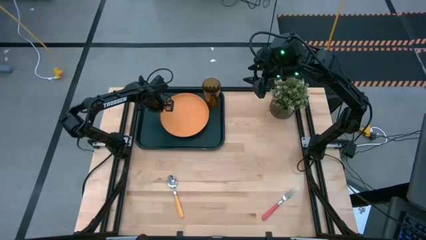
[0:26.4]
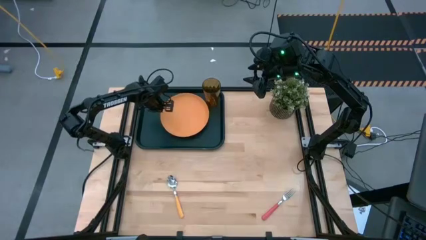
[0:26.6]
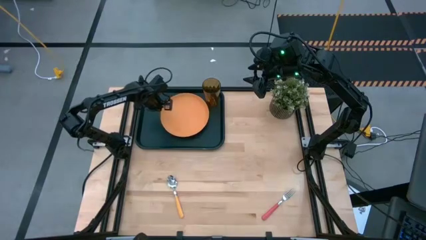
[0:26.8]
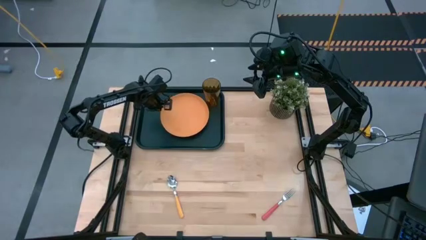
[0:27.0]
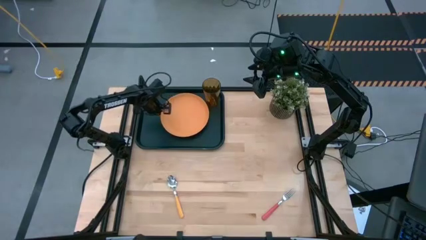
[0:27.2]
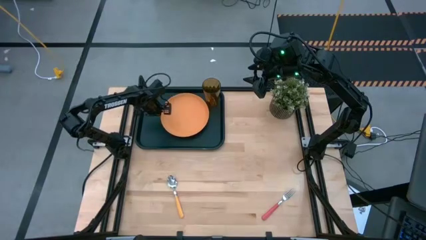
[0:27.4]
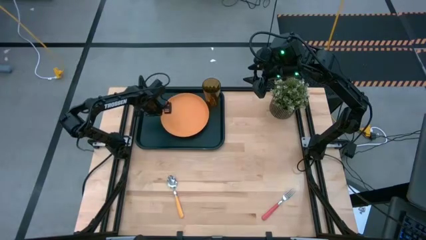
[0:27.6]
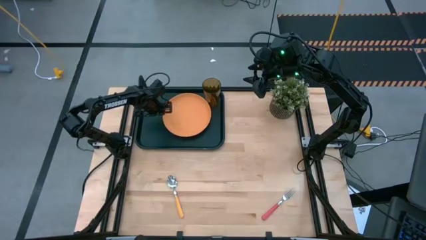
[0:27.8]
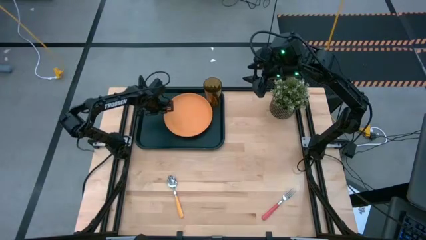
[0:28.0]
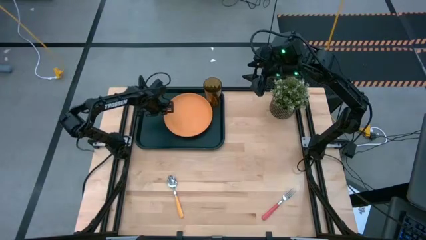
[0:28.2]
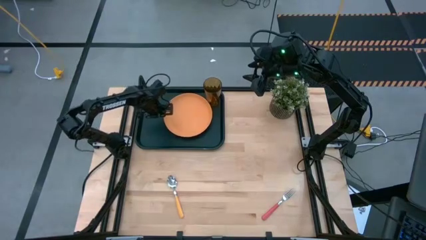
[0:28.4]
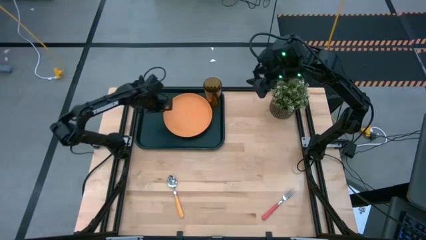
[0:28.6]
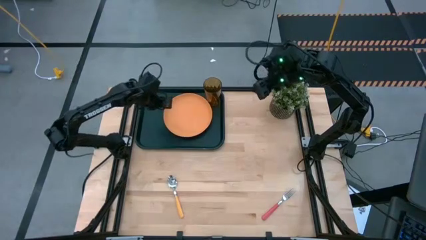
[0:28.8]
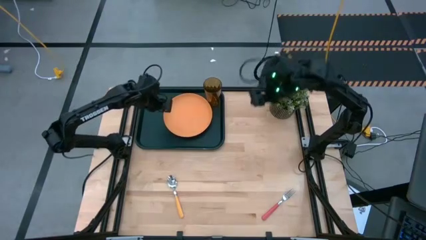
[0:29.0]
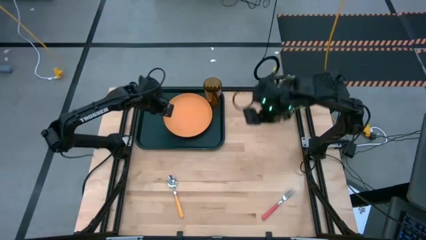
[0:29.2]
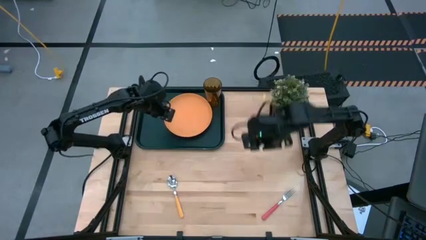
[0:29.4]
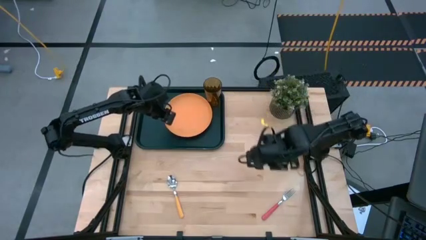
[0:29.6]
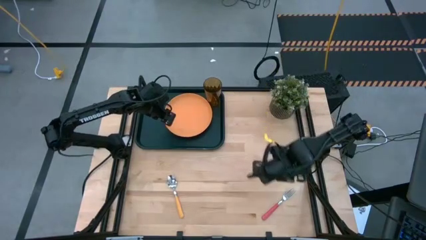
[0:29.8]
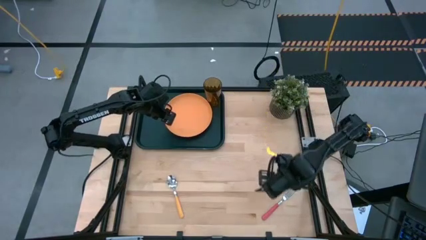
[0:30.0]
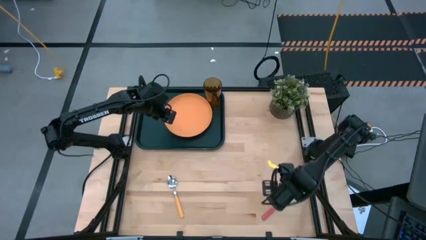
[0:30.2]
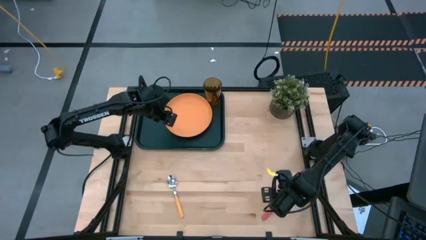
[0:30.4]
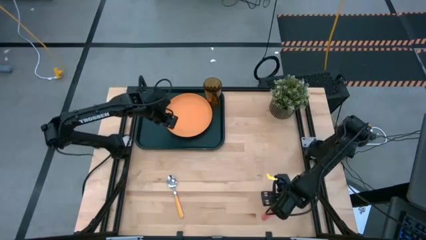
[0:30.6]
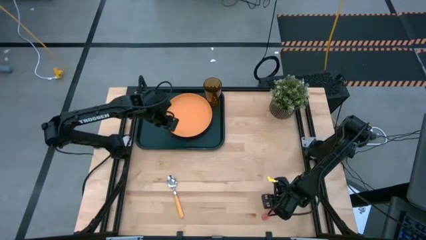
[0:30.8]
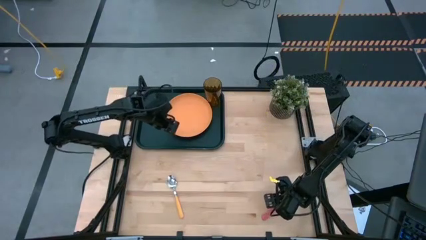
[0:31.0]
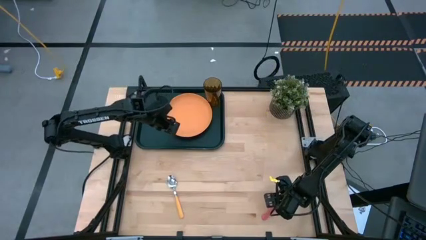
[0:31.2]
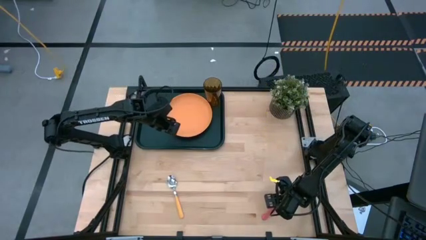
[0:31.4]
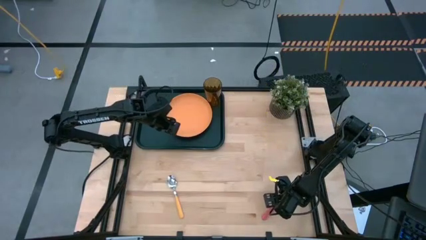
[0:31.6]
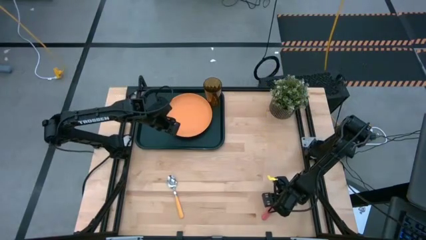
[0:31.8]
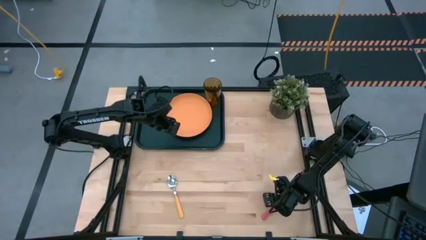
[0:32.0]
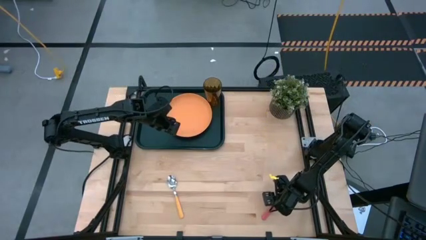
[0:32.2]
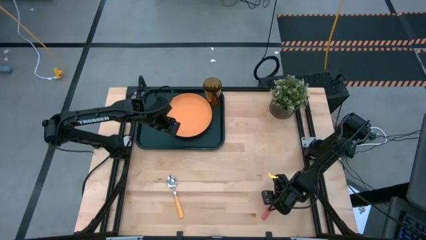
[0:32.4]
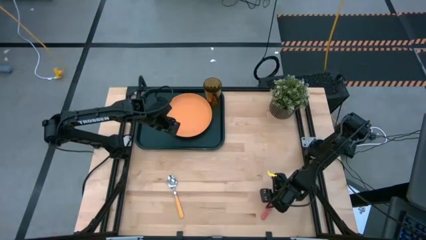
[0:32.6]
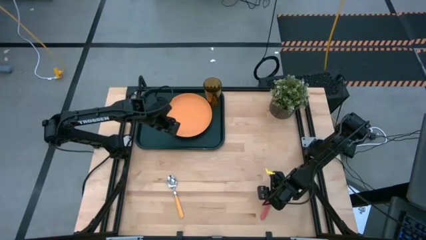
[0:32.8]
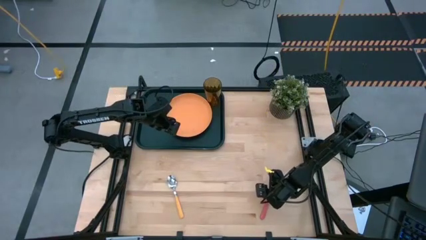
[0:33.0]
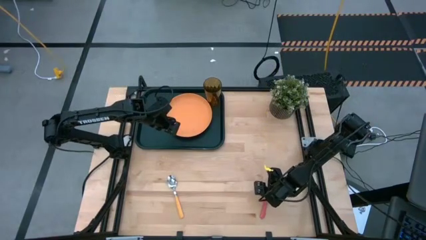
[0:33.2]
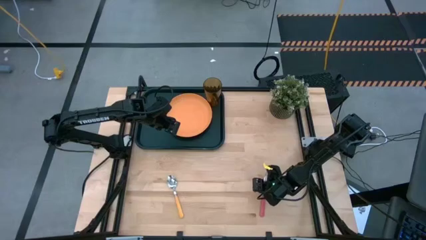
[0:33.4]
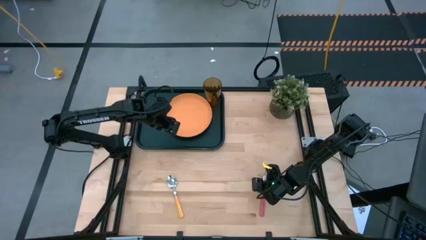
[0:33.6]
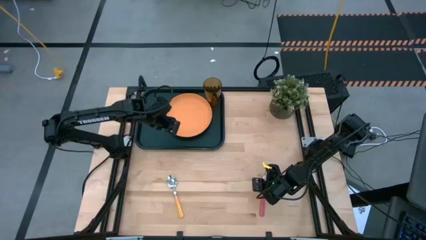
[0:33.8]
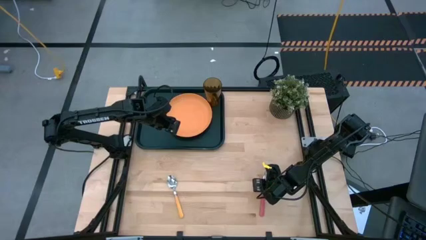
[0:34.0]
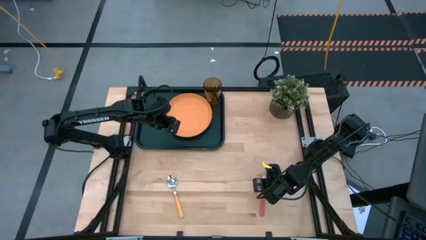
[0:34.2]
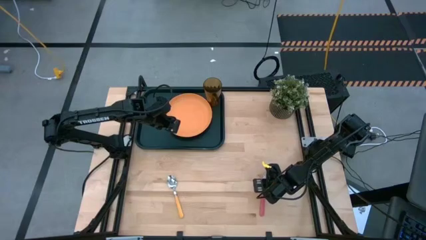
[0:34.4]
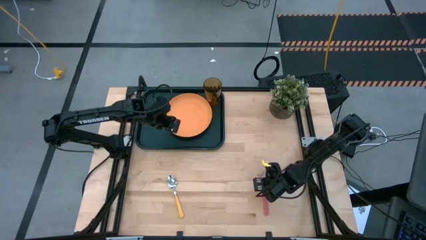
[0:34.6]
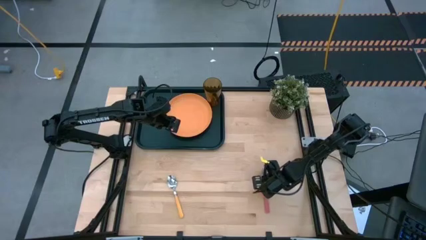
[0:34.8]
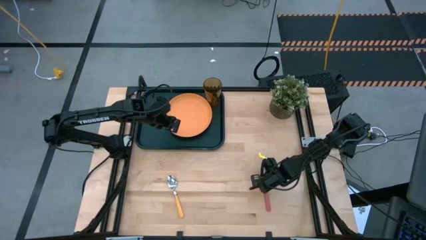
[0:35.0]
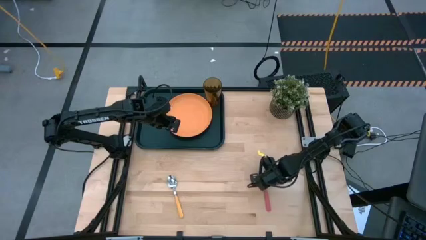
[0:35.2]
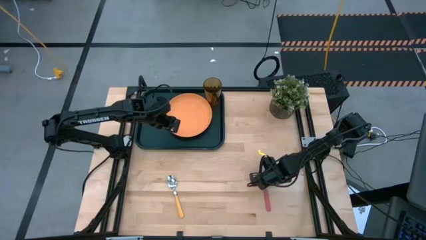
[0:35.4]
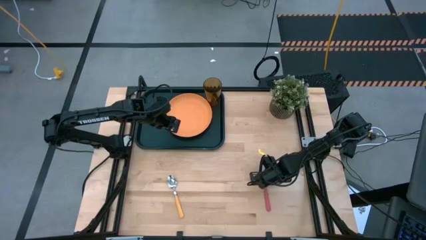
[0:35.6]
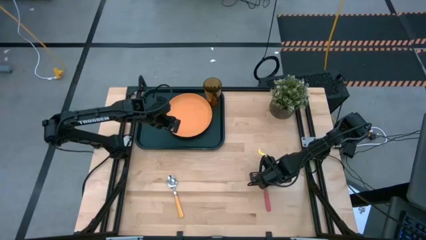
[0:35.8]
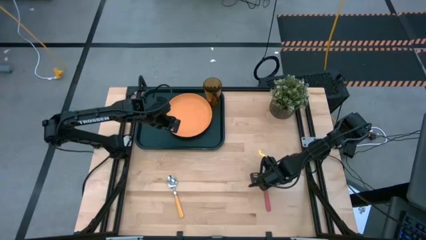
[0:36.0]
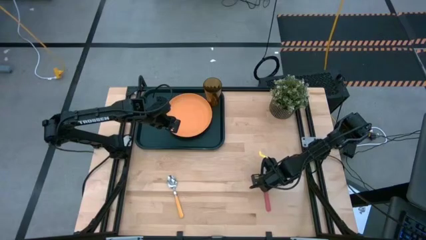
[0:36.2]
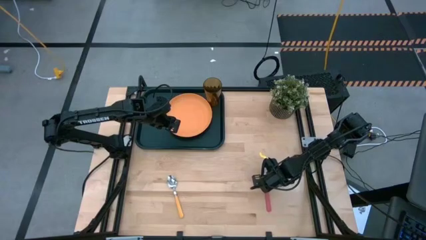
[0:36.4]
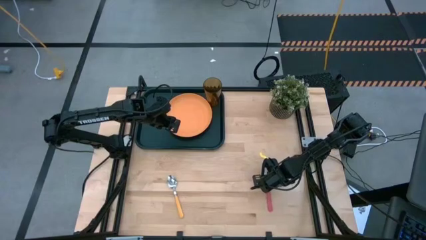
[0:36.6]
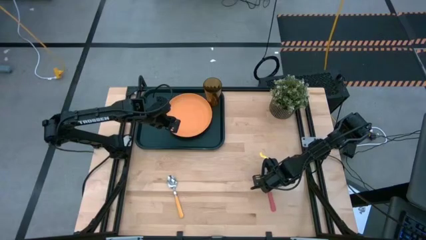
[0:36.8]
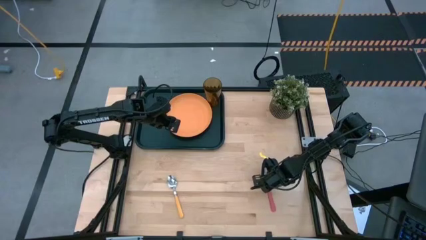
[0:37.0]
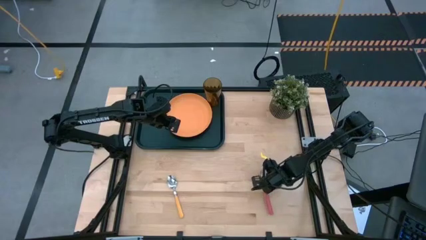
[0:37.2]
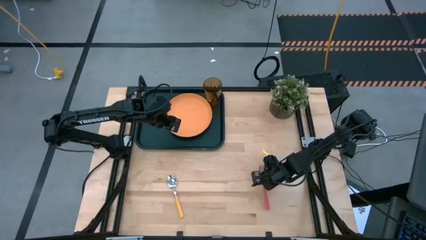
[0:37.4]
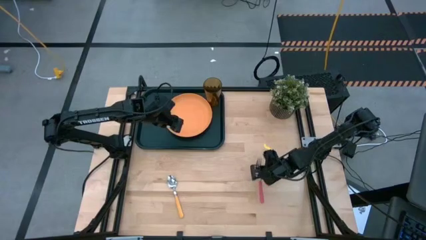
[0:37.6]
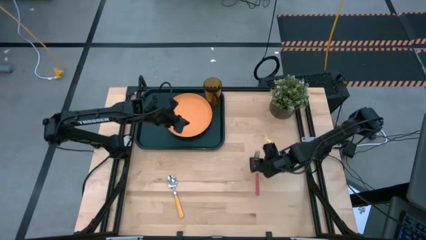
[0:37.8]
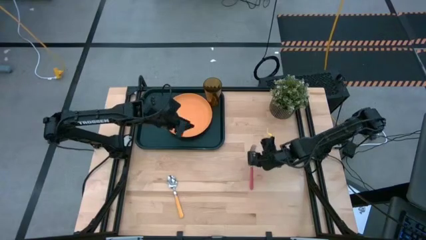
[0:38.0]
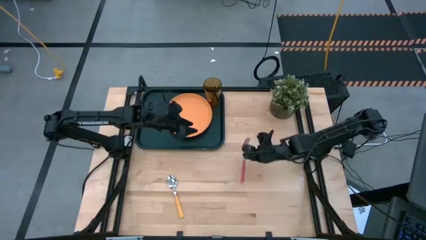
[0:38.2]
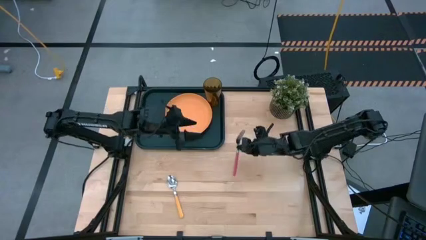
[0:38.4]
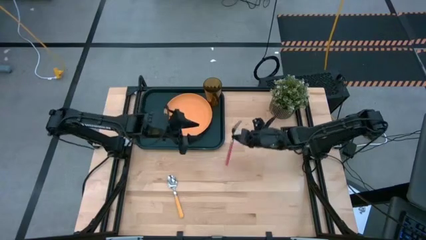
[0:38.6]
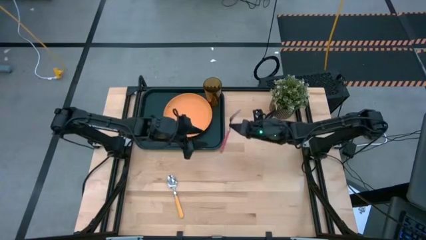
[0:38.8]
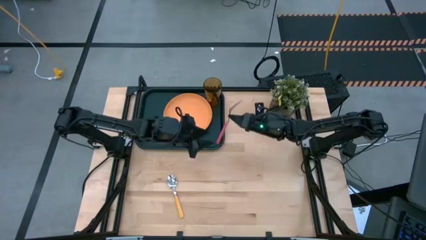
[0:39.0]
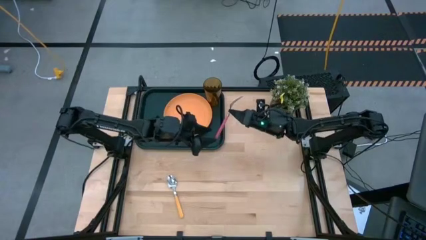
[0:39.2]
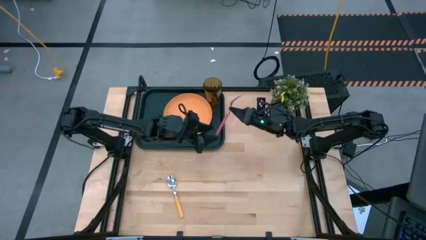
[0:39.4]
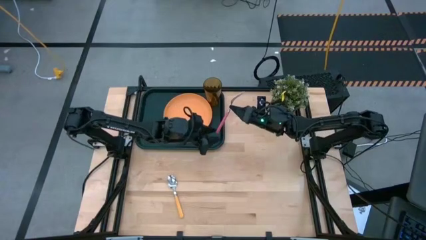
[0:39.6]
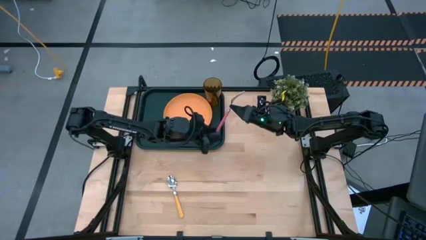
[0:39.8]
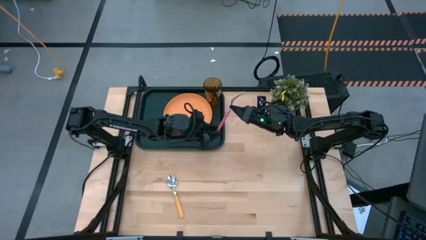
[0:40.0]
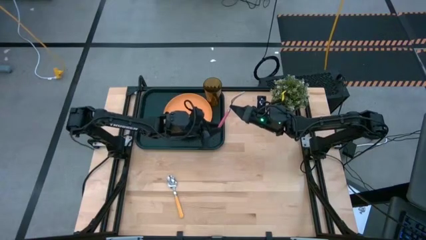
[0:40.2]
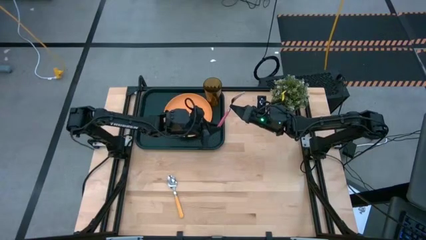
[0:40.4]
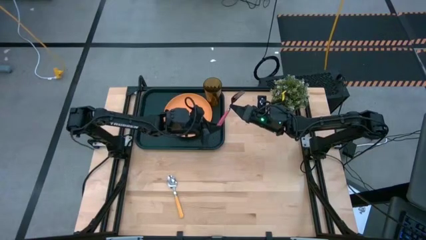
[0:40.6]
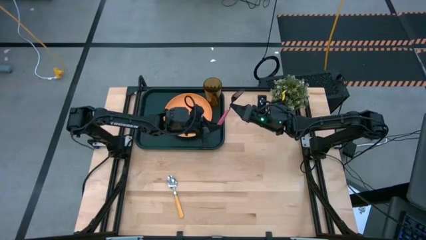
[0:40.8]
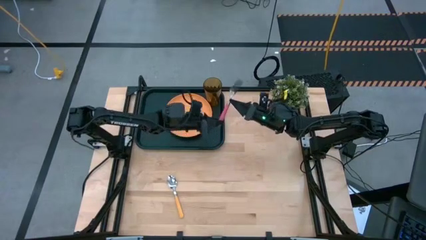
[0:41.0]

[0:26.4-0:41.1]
Task: Pick and place plate/cup/fork/spoon on tray
Put the pink fork on the black serving tray to the left of the orange plate

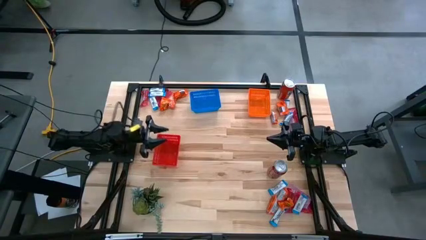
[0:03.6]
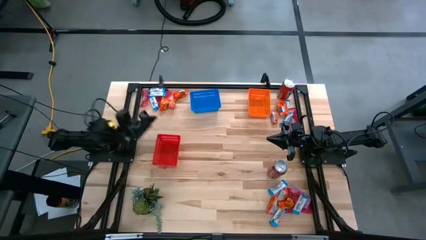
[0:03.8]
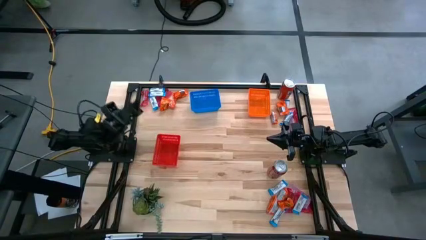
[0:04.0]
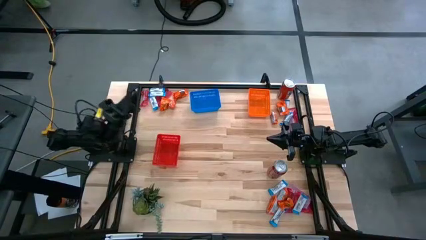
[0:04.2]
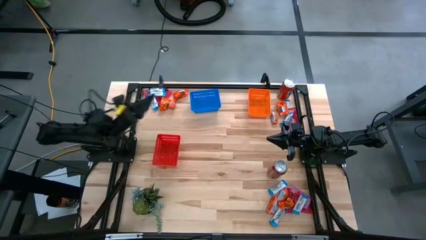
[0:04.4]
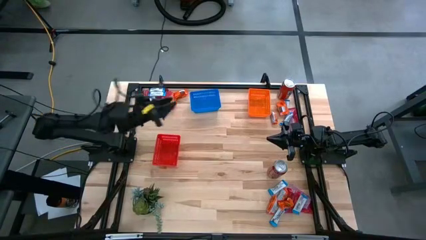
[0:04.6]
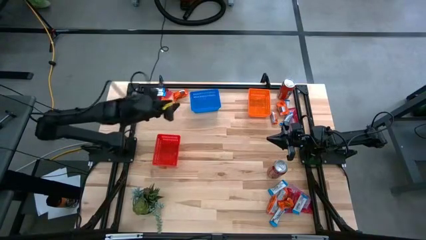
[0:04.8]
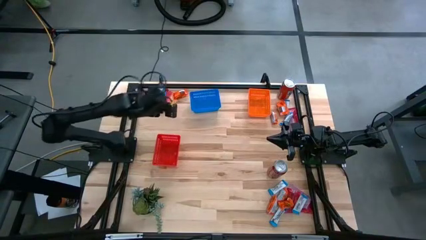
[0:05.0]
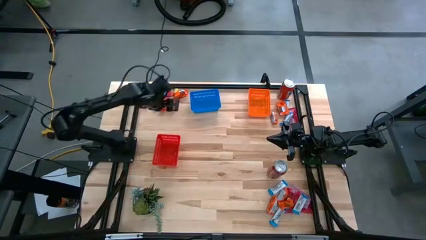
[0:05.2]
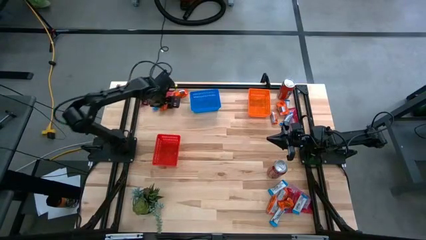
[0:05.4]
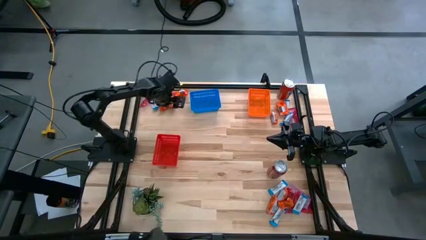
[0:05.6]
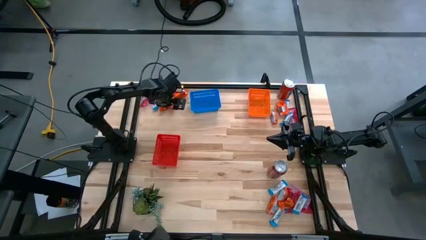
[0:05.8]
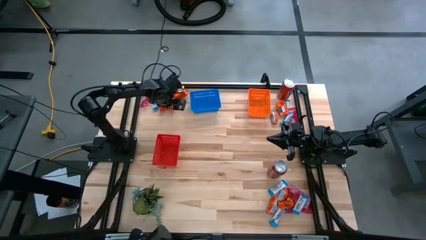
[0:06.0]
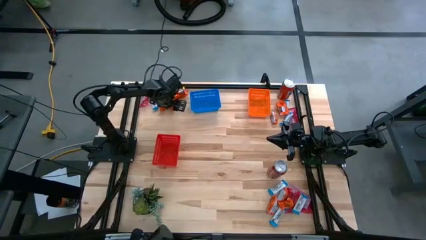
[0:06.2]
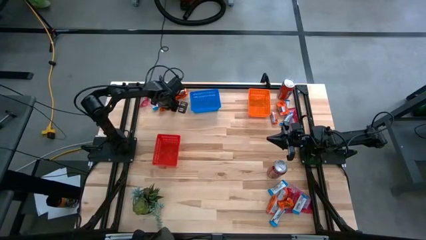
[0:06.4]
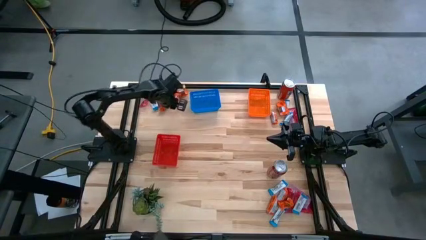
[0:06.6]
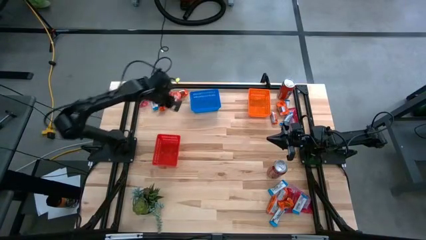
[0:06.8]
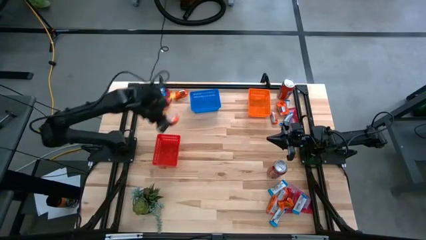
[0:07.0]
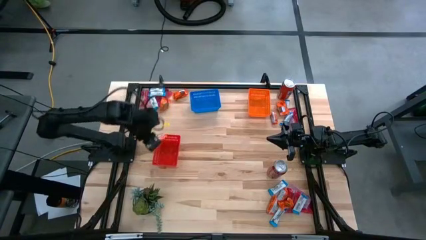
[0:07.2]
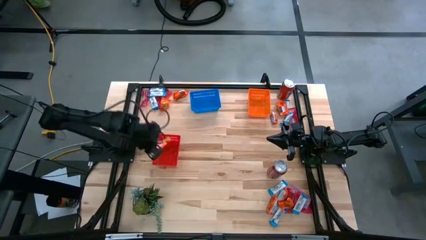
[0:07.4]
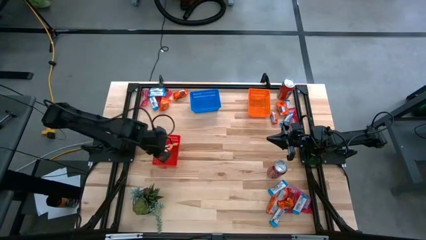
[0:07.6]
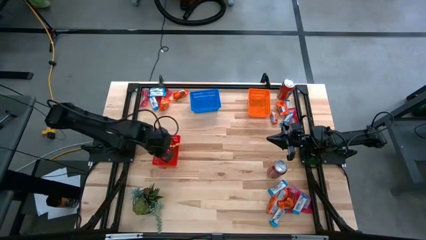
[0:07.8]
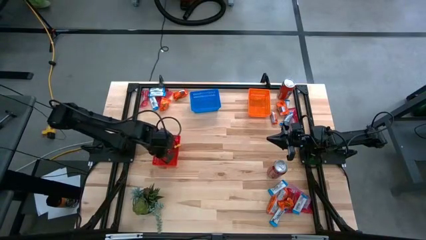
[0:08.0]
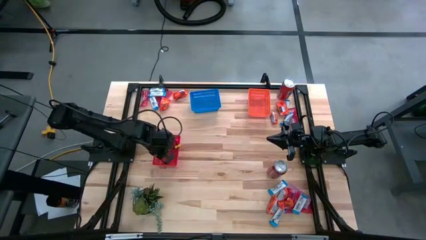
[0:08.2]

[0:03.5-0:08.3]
Task: Sort candy
Put the orange candy pack into the red basket
